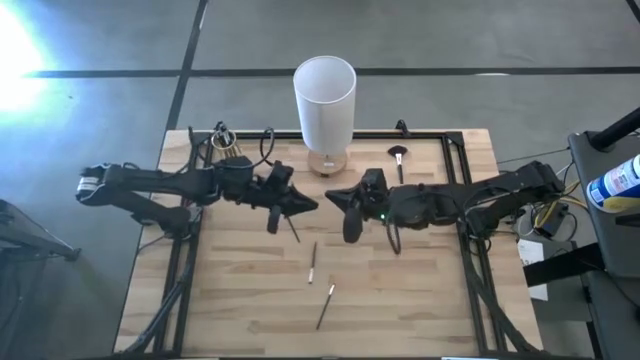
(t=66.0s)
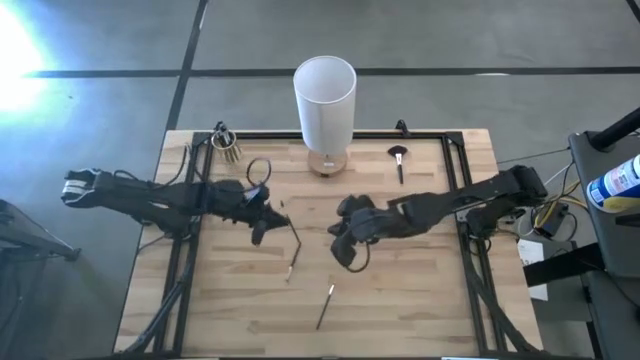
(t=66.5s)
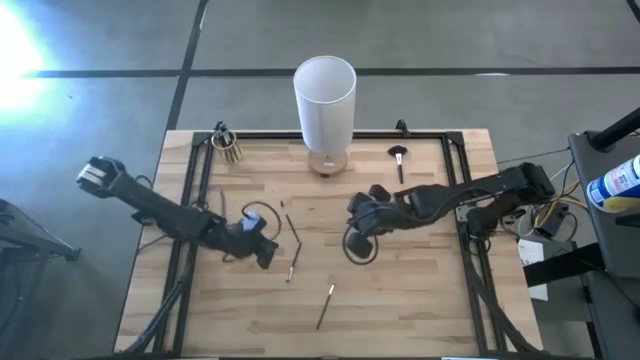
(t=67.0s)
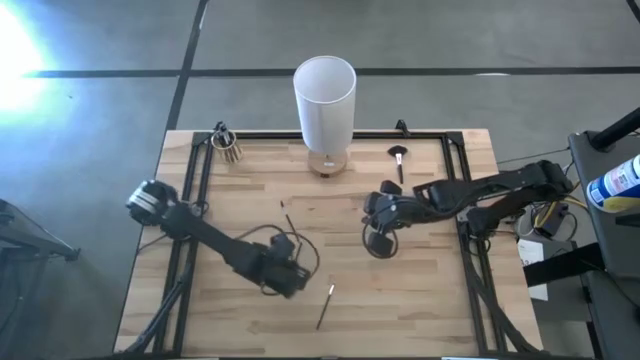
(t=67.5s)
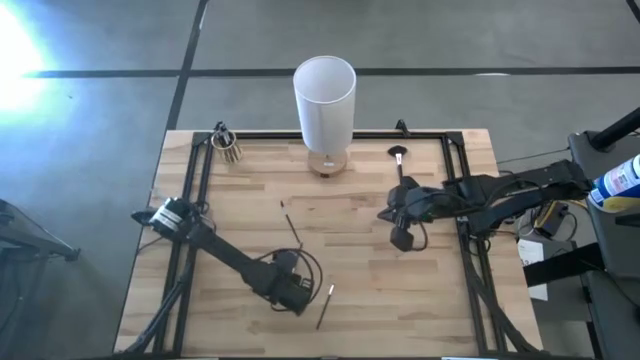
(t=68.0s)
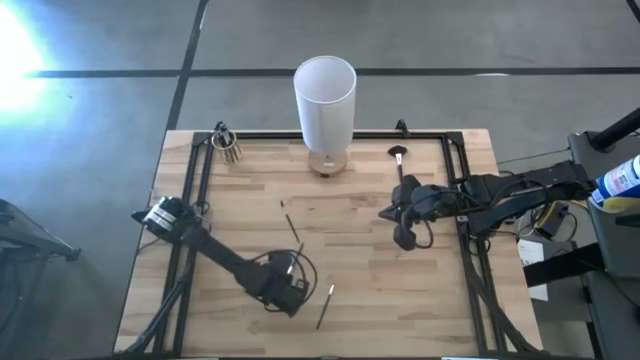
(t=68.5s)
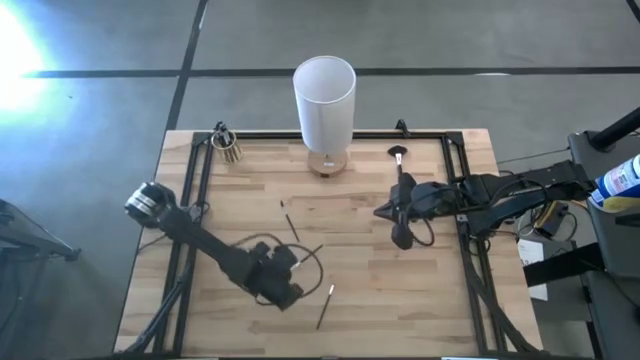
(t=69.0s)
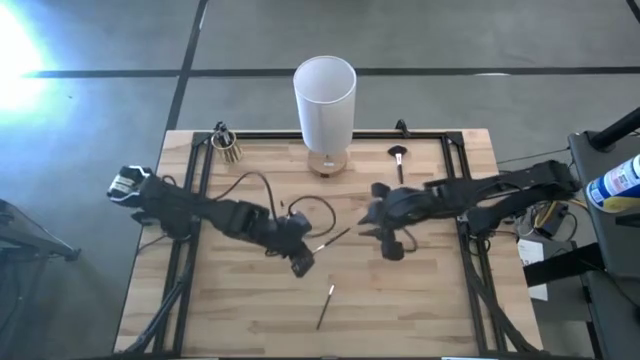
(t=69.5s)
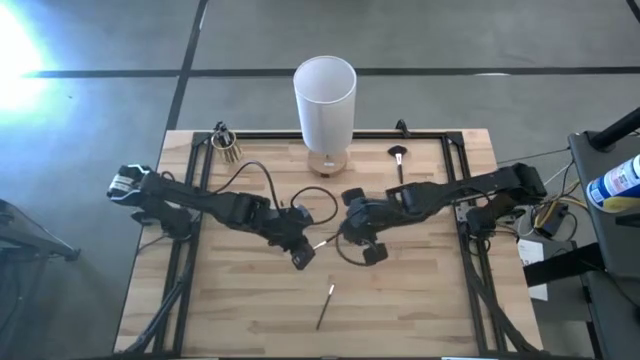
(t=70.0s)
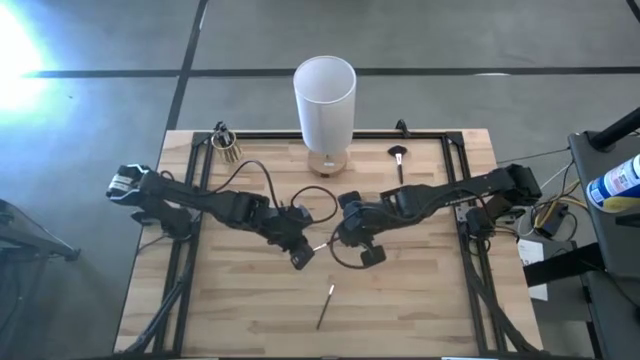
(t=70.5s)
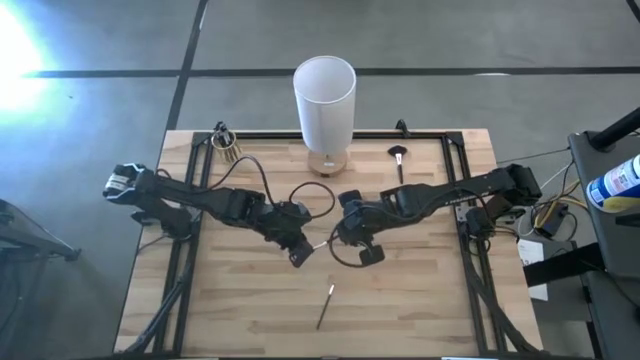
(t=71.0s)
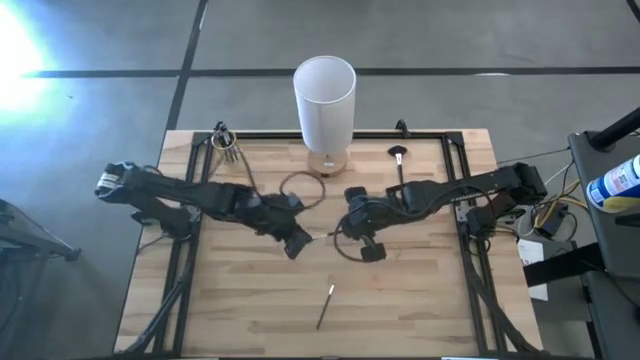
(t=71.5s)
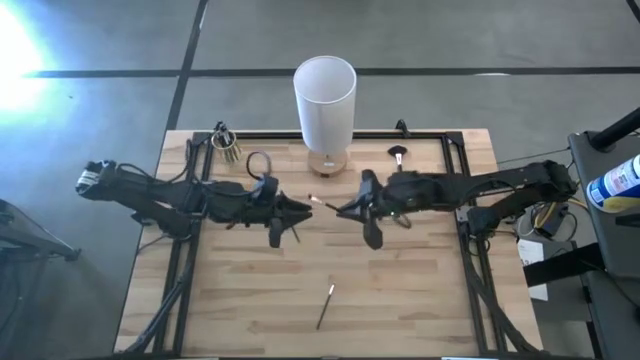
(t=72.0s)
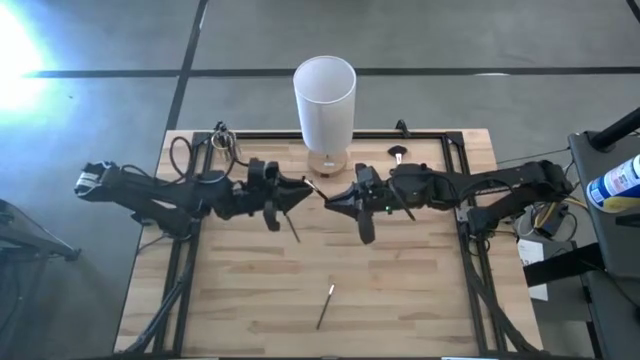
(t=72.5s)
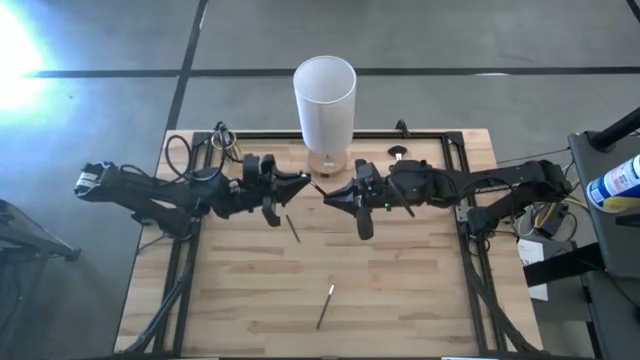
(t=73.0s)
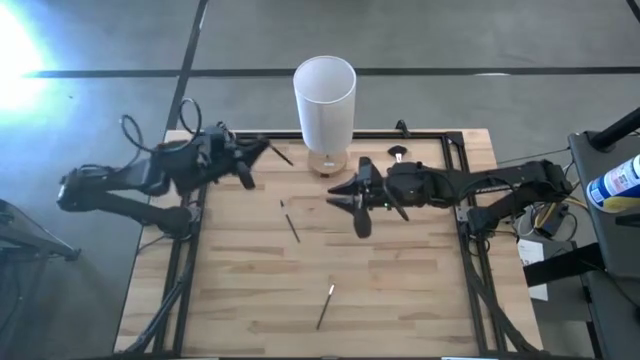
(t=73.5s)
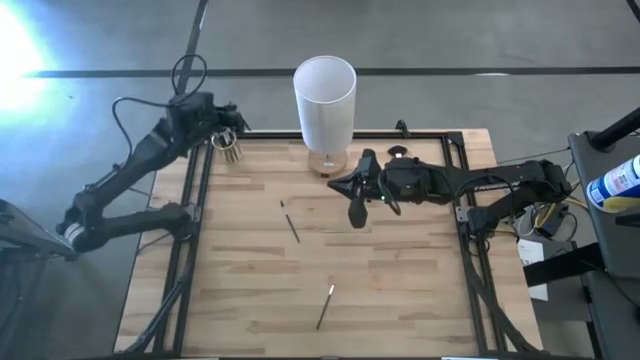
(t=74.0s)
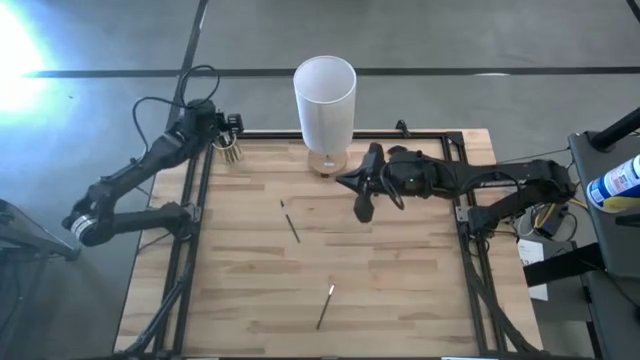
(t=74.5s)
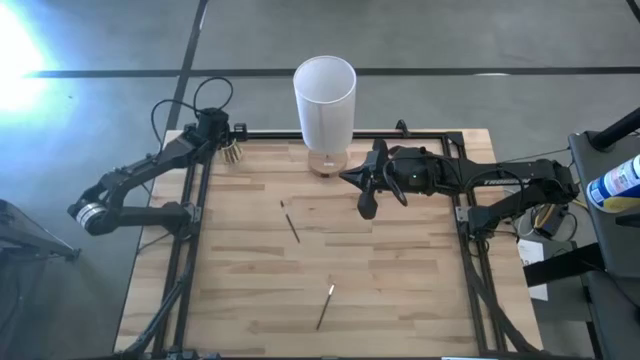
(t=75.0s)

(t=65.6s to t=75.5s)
Task: Pick & Place Makeup Brushes
Put the eyeshadow brush into the makeup holder

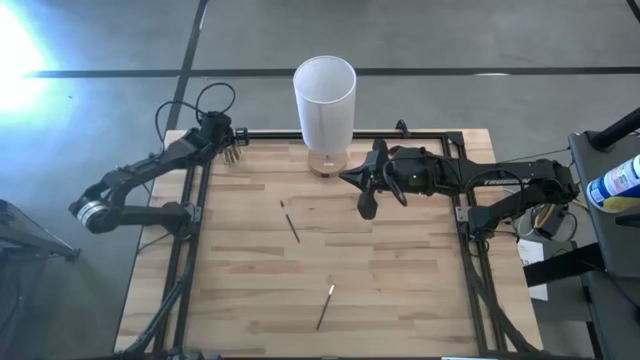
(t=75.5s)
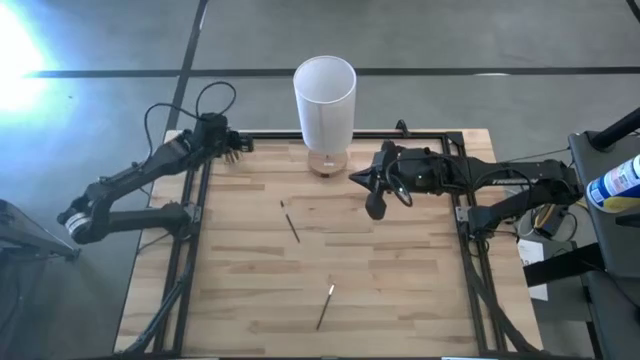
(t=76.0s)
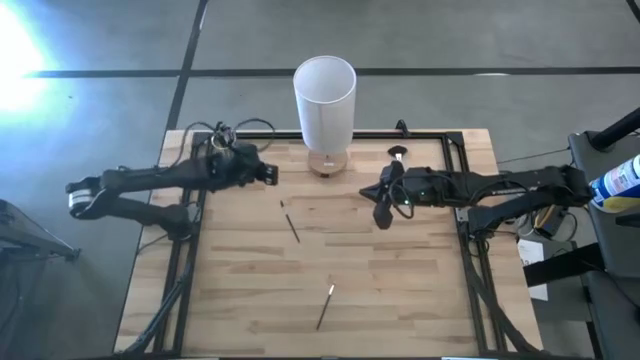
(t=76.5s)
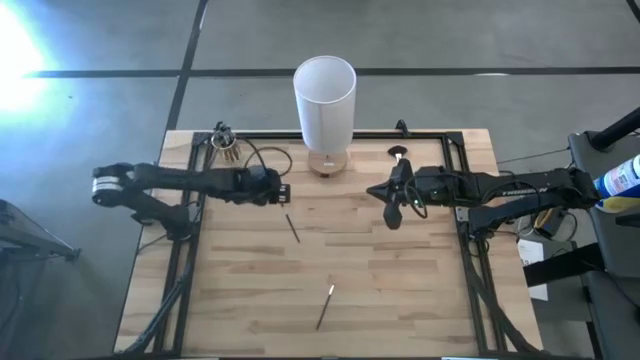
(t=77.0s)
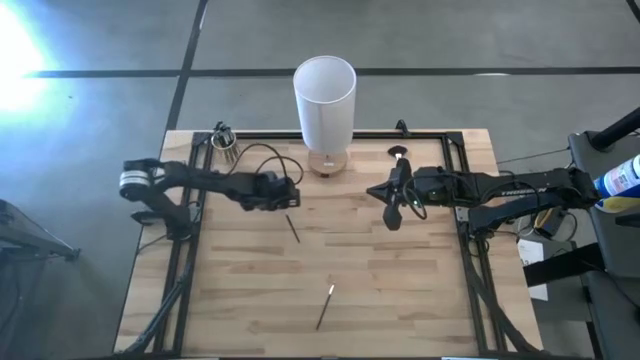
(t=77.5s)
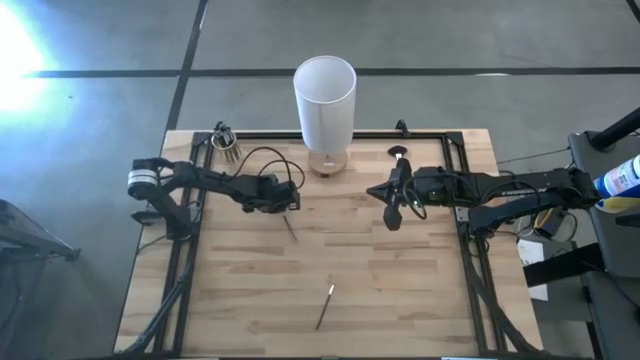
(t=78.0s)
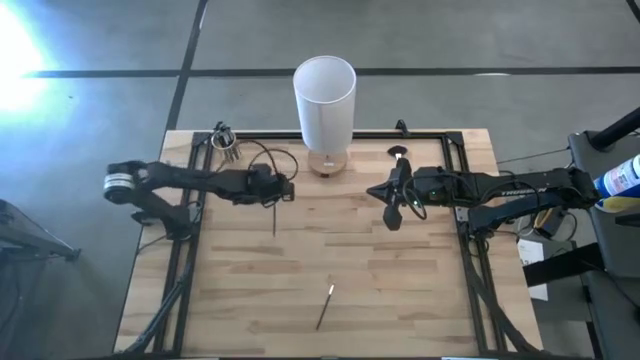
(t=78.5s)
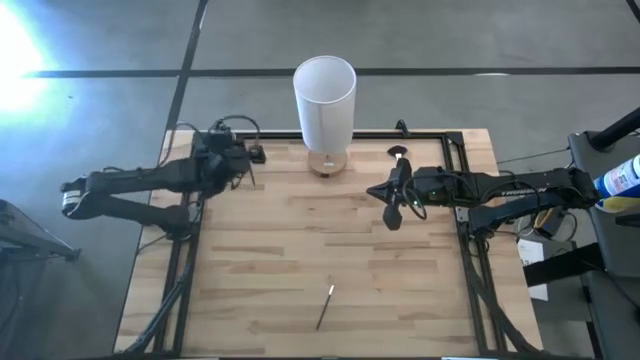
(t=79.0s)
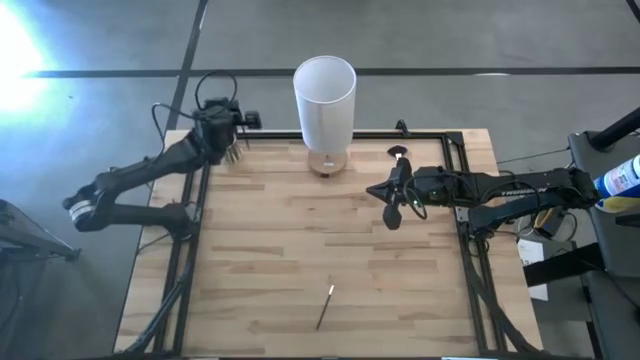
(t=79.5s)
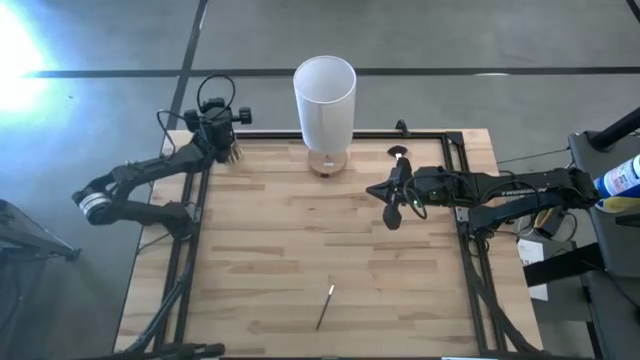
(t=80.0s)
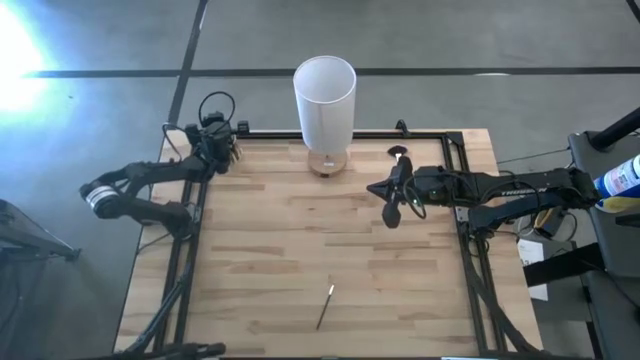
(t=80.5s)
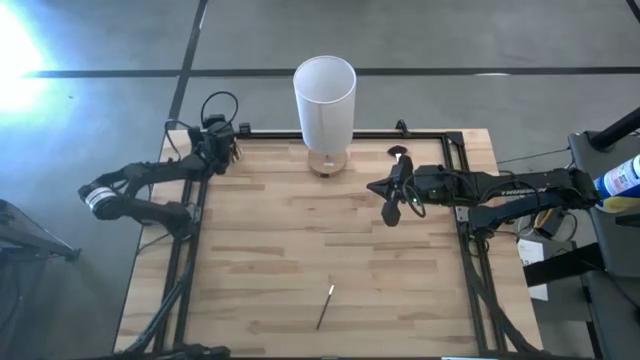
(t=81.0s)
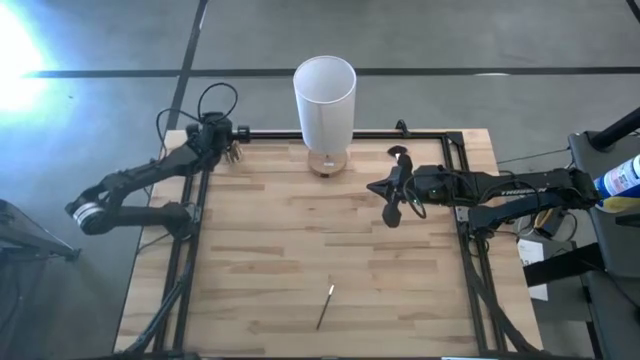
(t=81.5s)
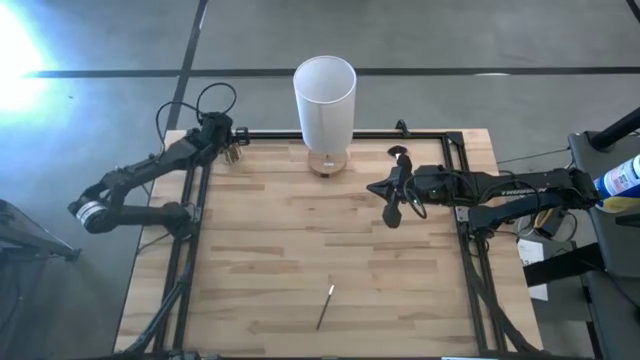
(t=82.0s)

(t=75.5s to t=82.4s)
Put the brow brush into the makeup holder

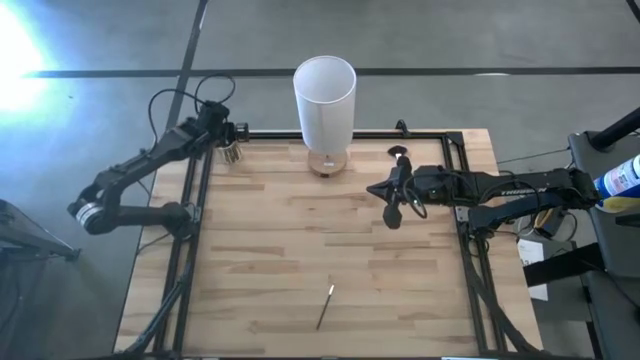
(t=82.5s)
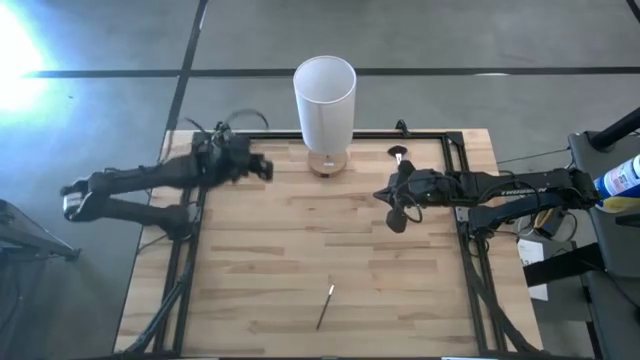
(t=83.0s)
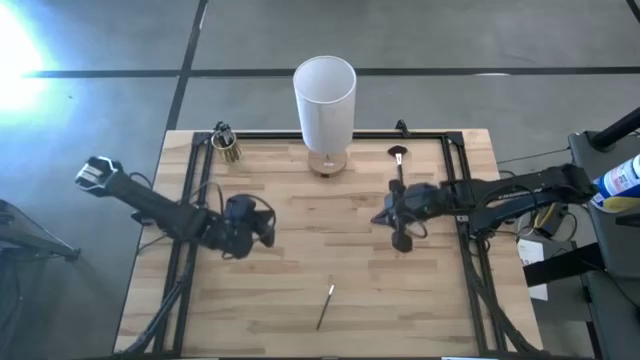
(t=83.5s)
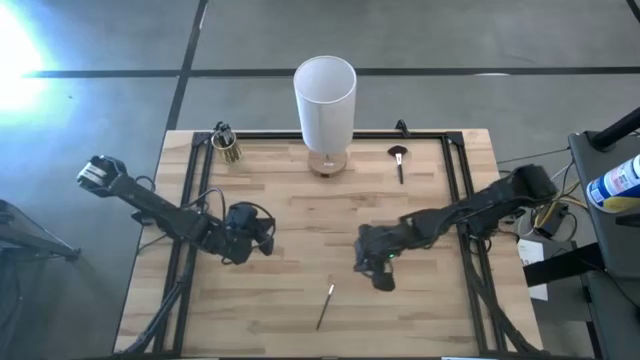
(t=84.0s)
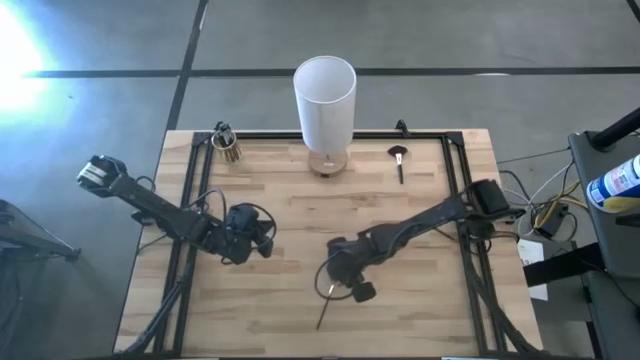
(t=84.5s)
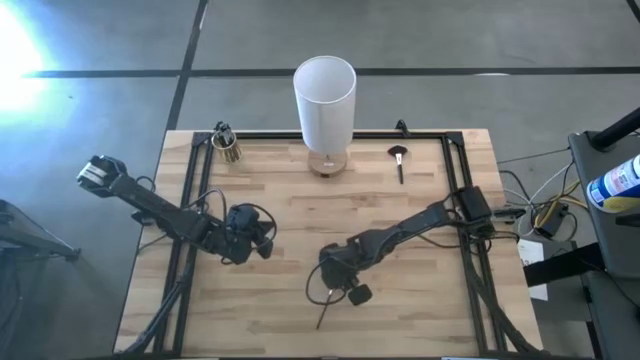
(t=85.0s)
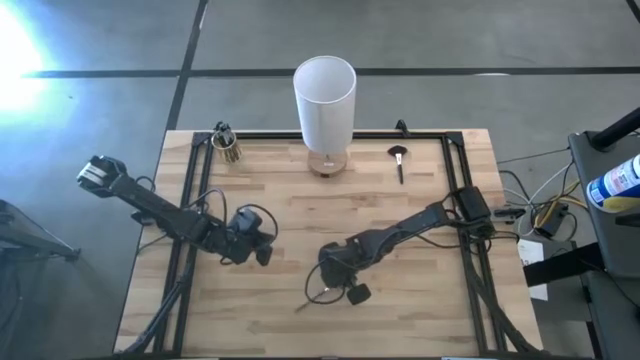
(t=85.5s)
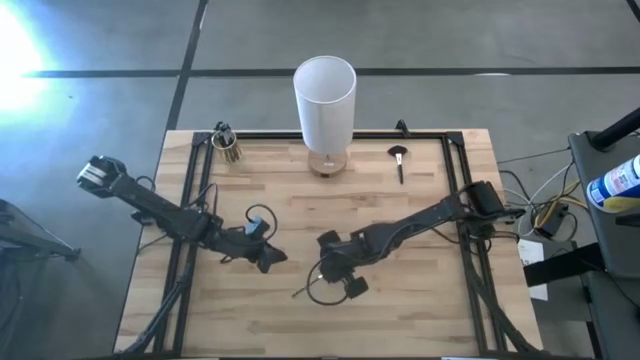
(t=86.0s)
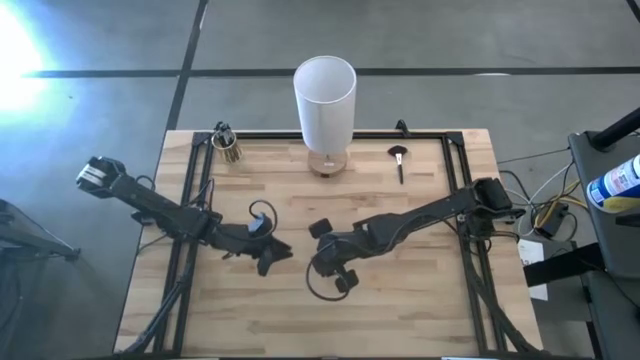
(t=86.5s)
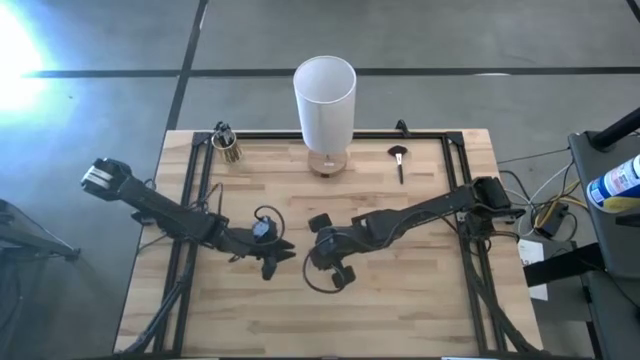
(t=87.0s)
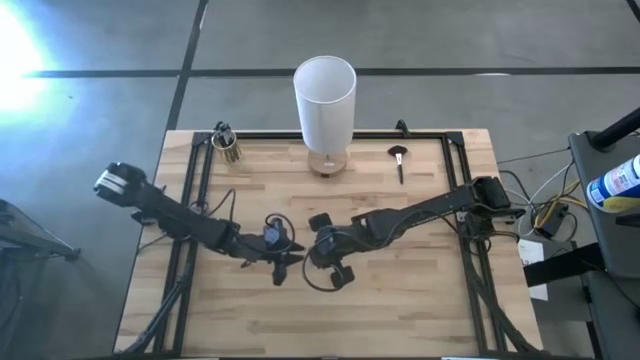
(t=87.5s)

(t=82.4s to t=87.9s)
Put the eyeshadow brush into the makeup holder
